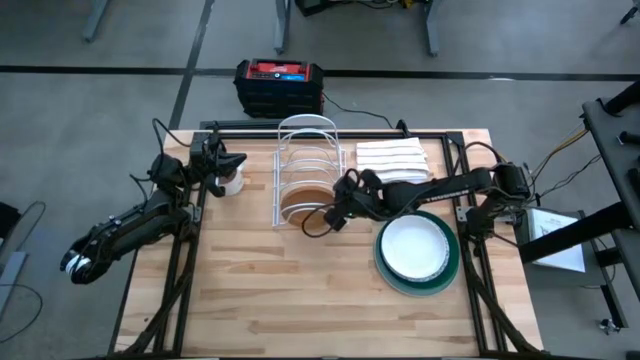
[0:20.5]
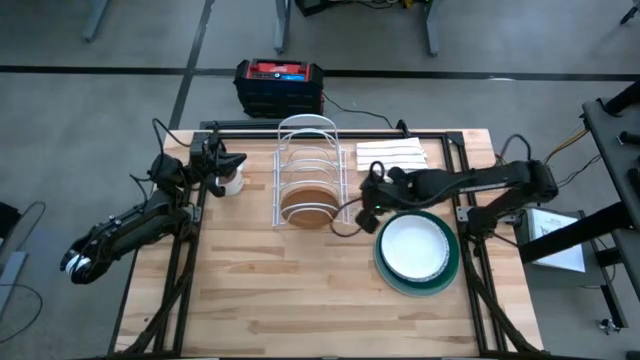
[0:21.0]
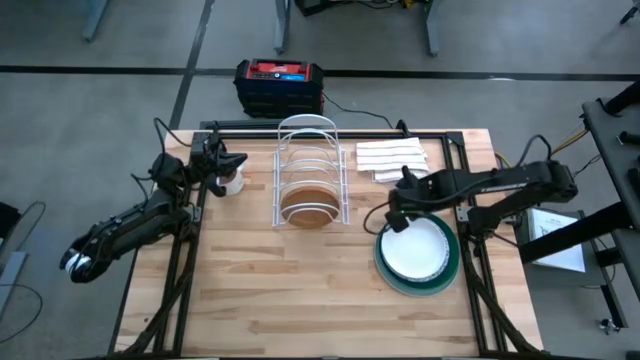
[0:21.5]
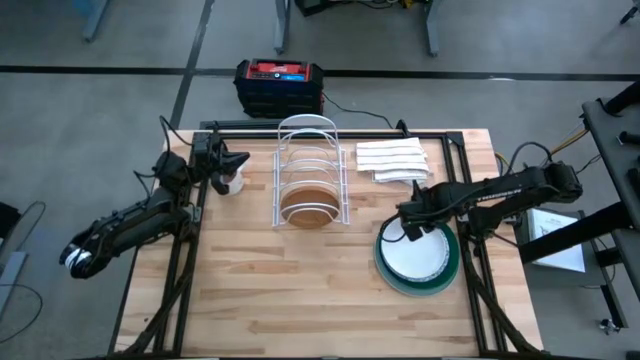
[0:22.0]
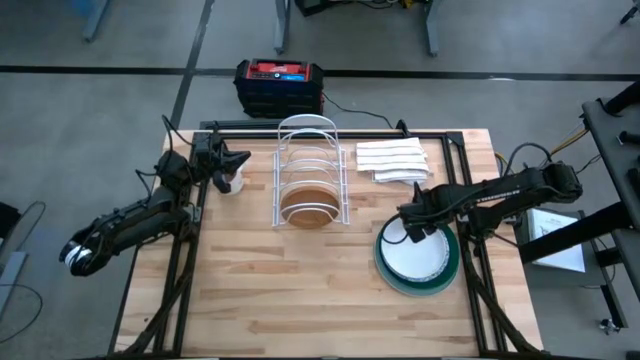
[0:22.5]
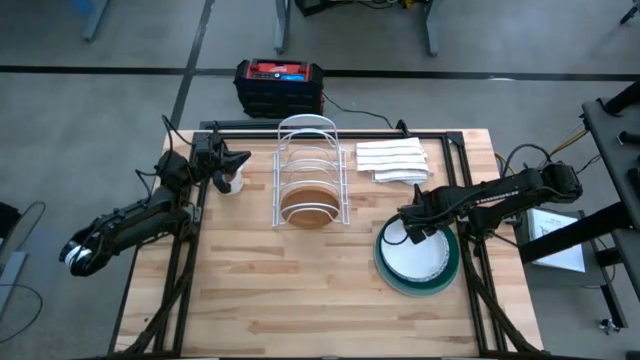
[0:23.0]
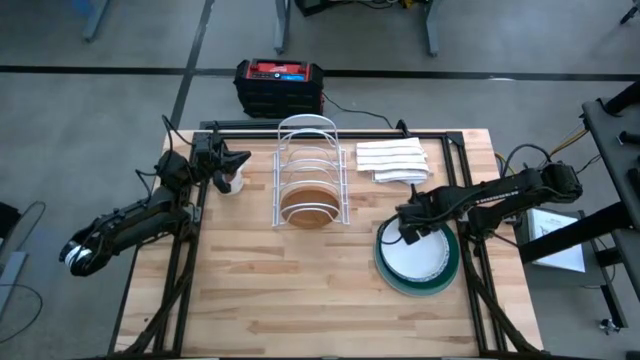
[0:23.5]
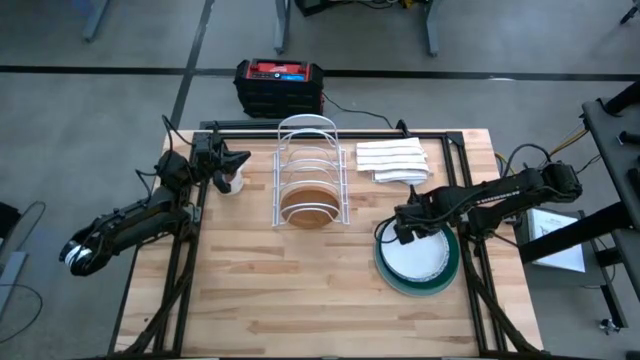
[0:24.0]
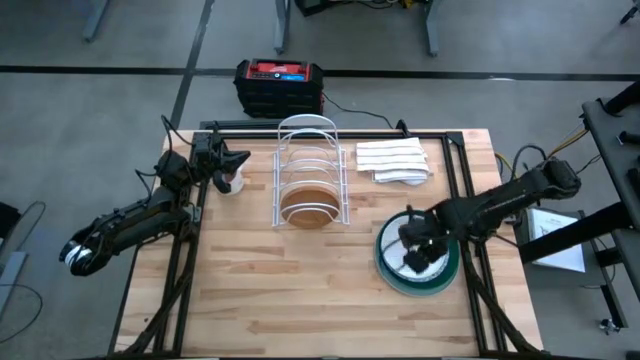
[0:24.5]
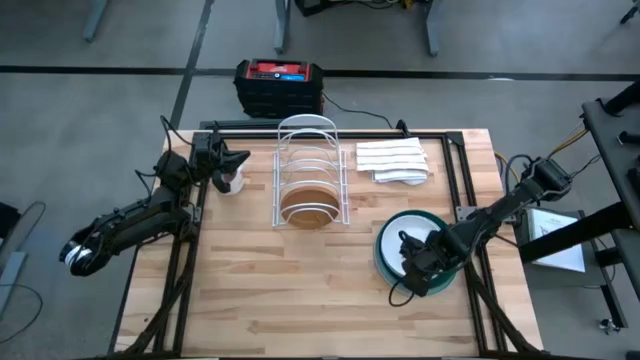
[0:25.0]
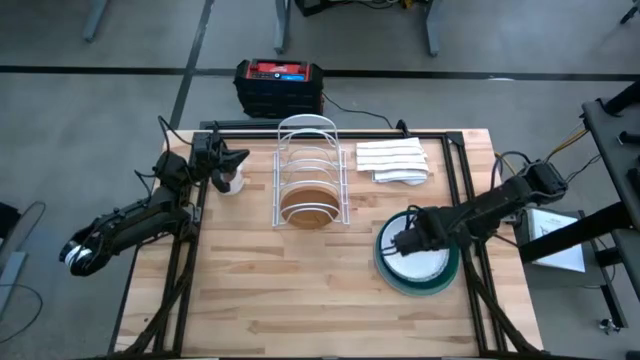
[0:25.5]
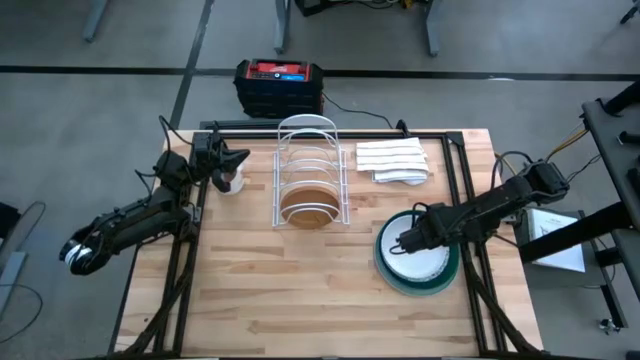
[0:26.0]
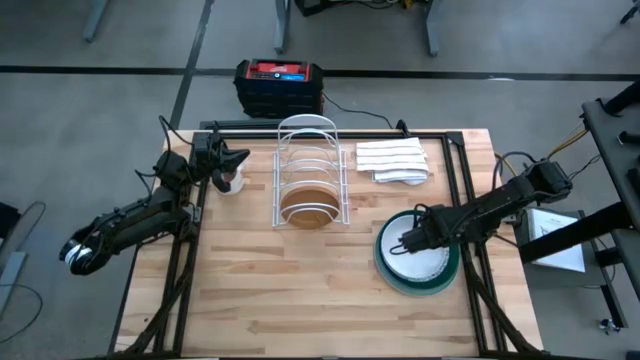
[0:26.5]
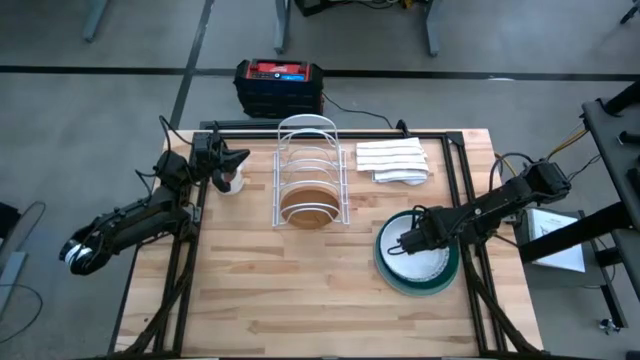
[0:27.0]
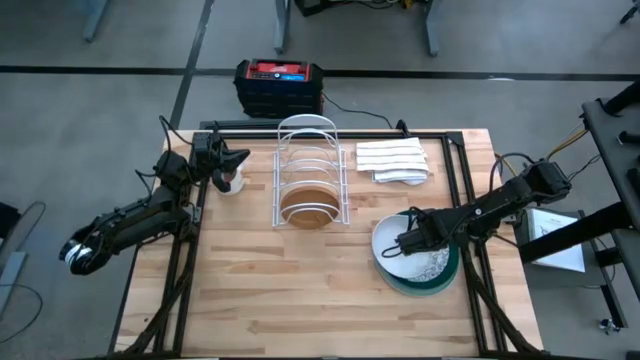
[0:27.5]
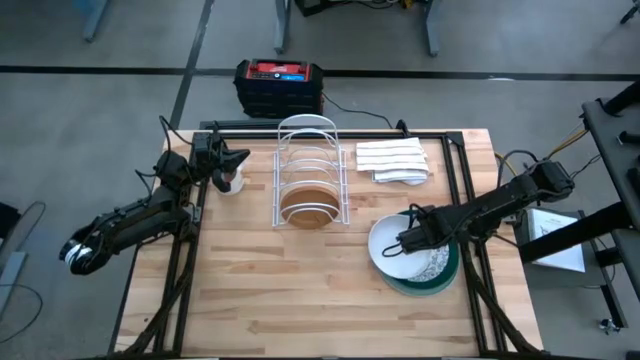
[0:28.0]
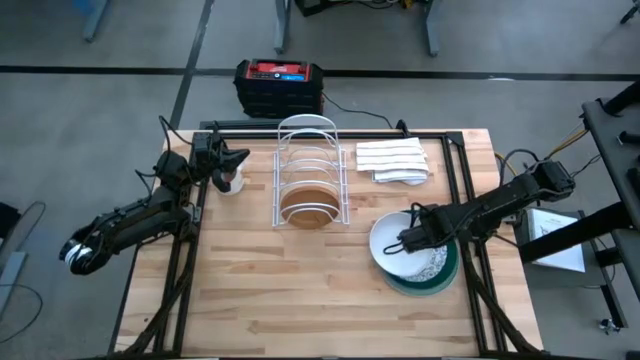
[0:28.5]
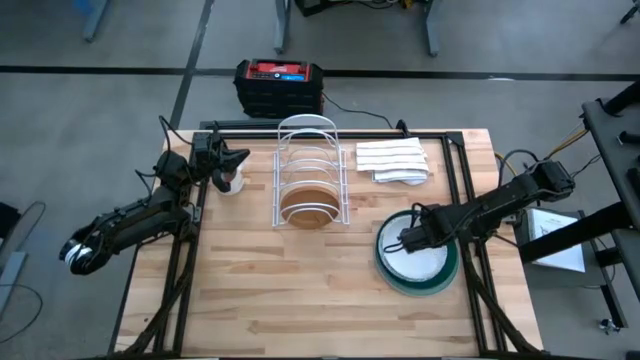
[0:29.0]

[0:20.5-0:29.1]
Task: Sort dishes
Put the white plate in the dish rack

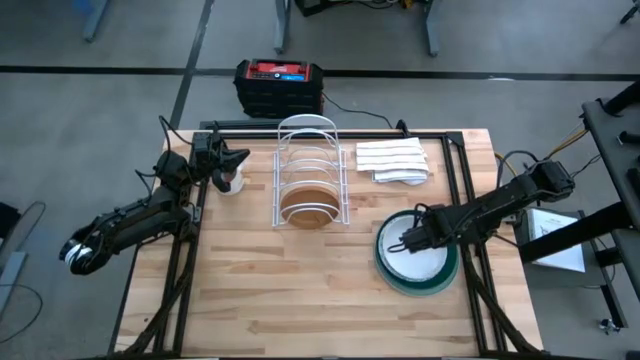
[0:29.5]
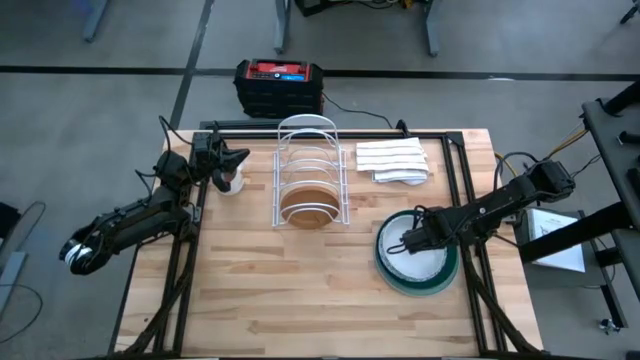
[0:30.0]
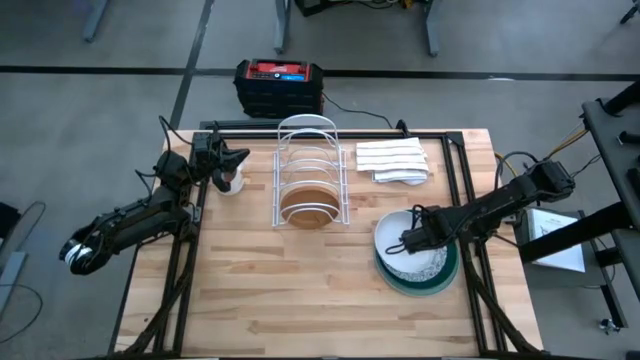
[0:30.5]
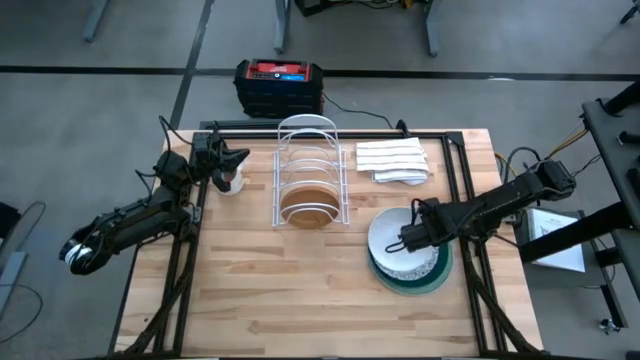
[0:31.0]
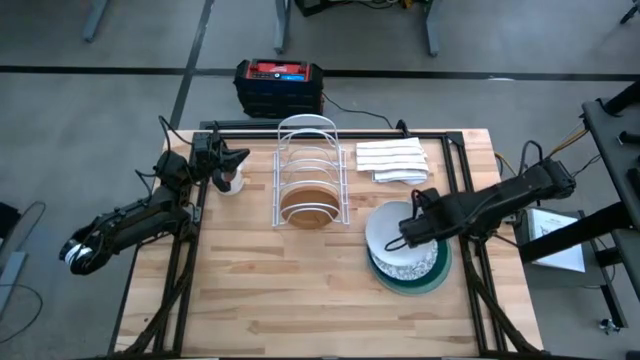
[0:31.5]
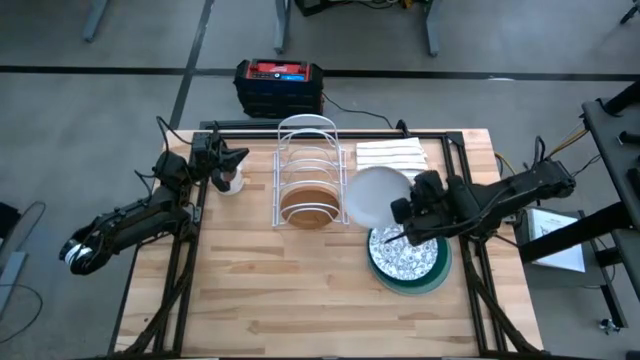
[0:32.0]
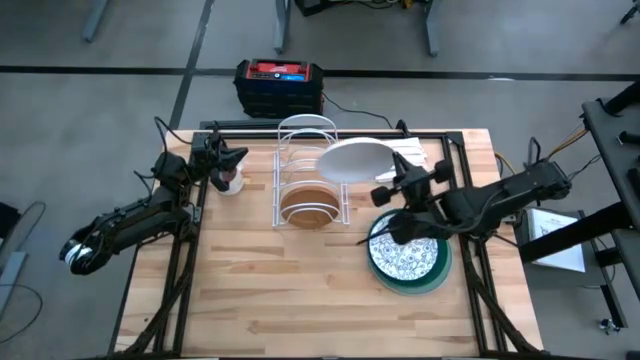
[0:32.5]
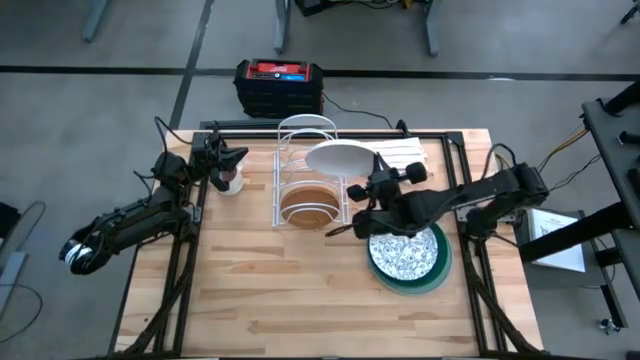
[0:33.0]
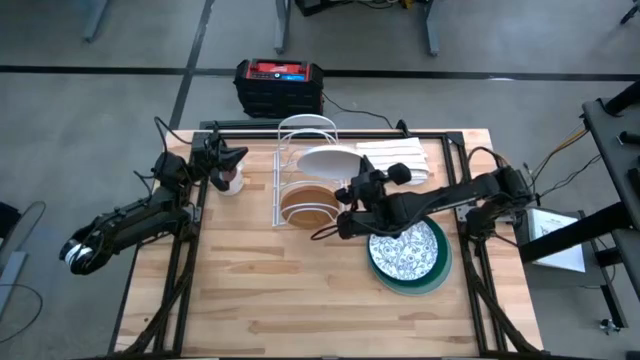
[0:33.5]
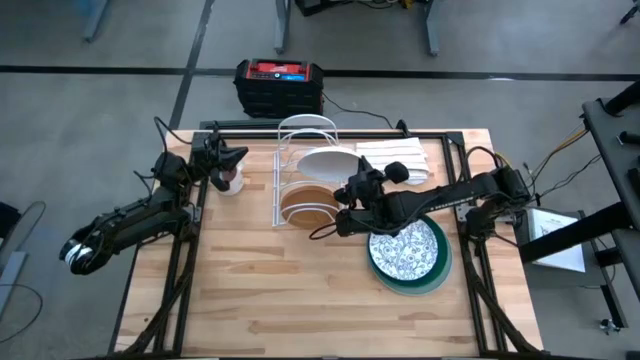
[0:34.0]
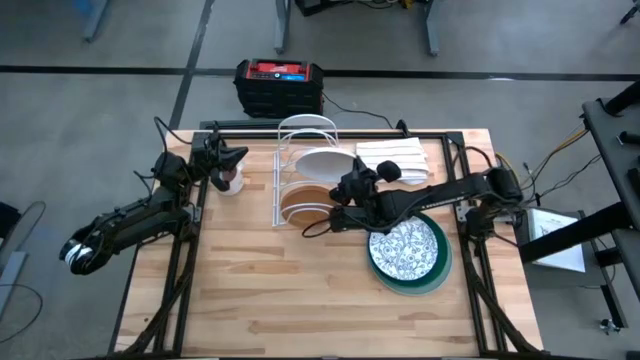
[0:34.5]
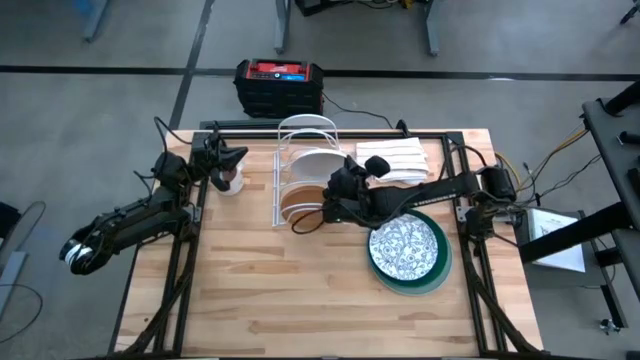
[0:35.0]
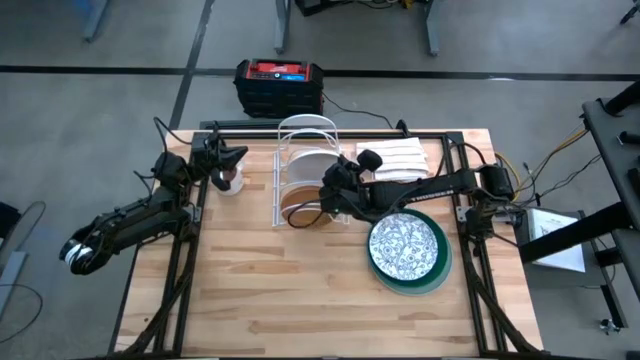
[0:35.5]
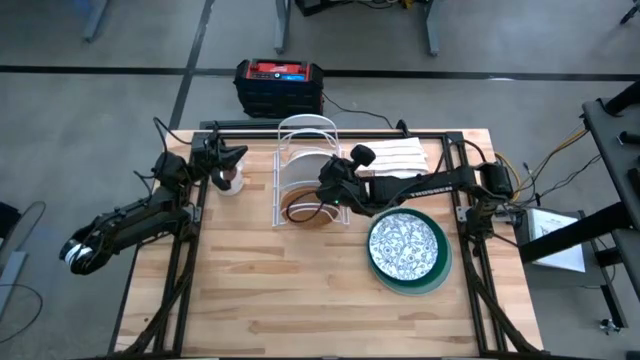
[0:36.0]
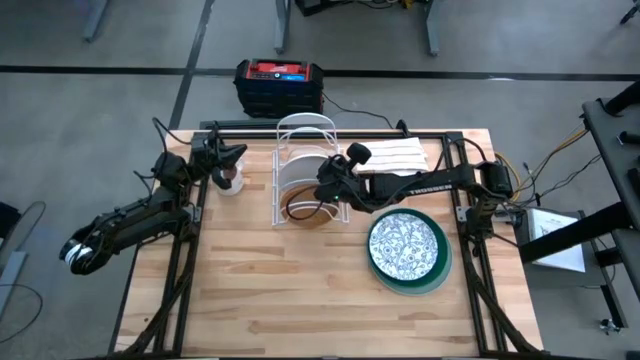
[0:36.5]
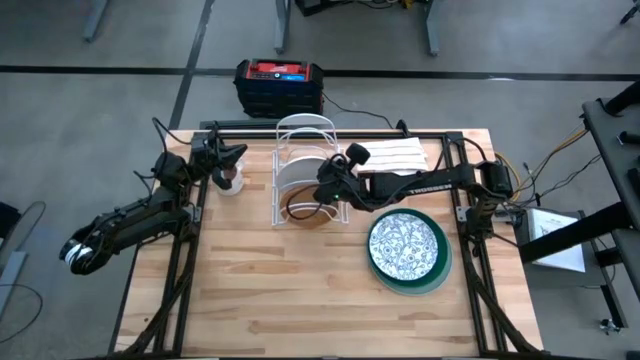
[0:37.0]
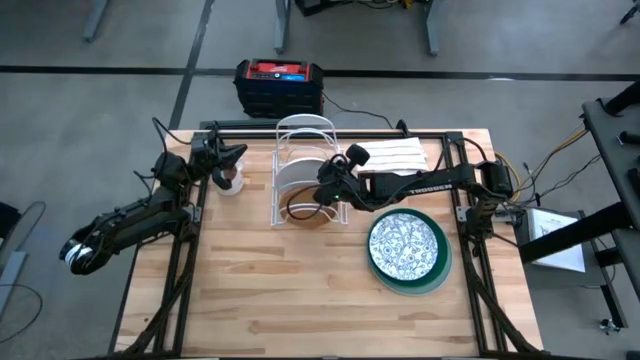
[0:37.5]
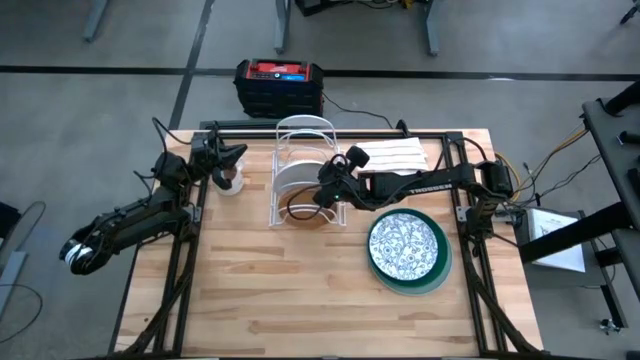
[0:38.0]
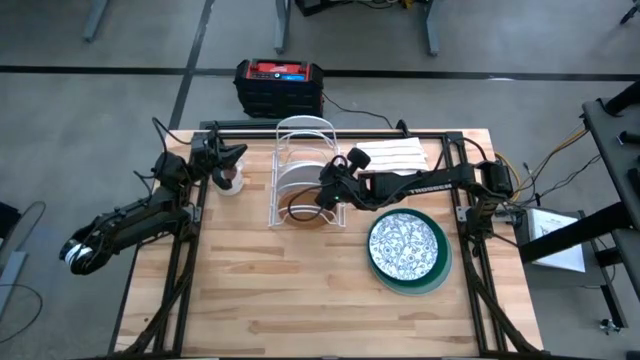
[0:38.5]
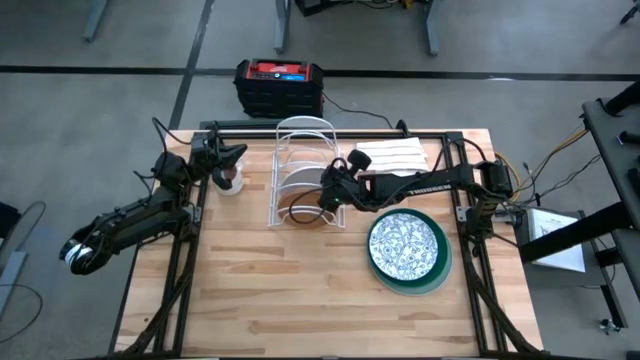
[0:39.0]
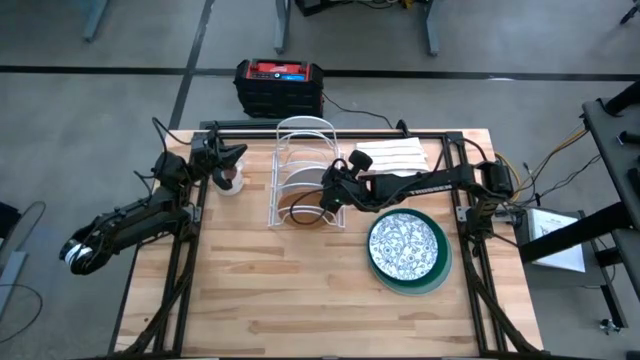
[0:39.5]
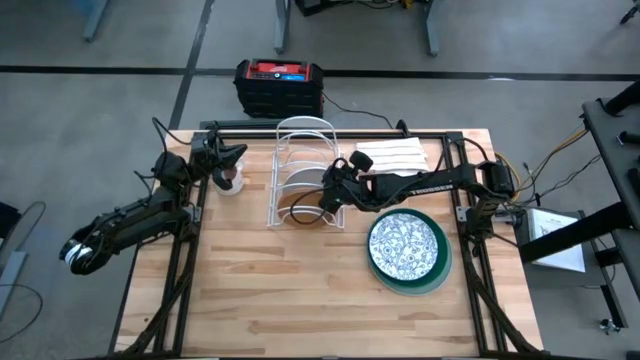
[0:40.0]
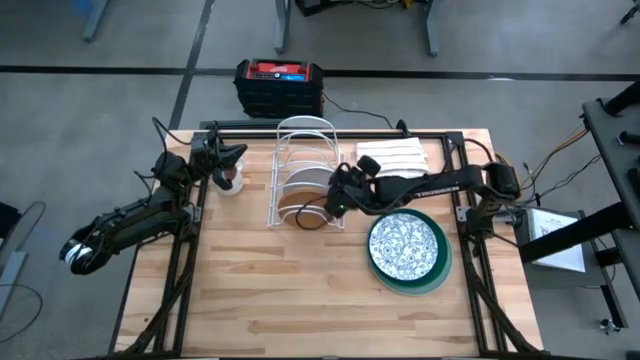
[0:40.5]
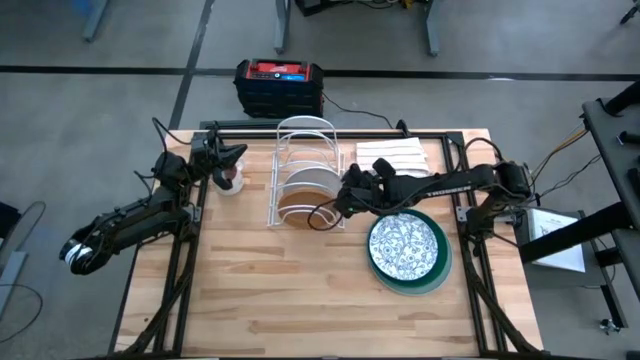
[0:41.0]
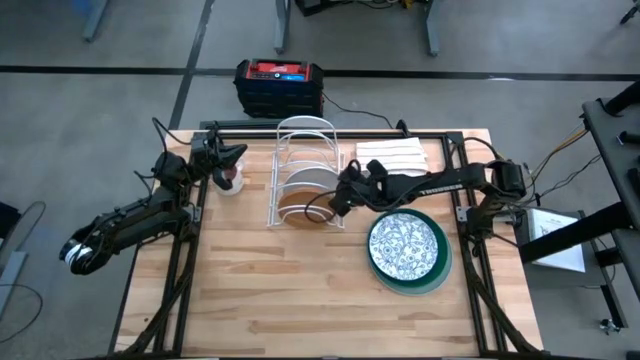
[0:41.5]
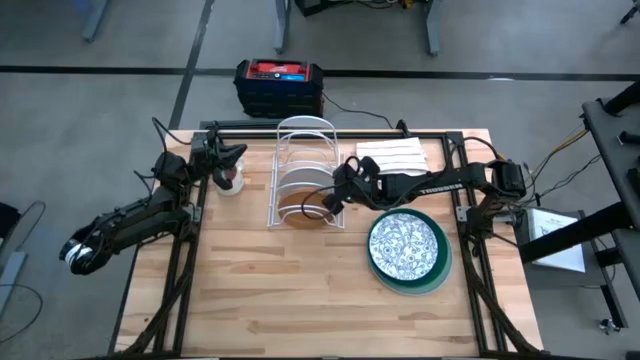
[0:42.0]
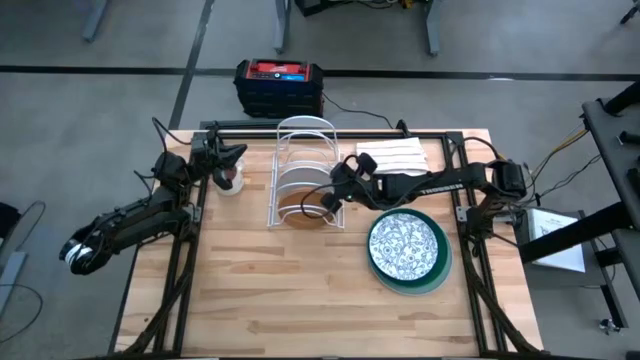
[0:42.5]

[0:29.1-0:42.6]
Put the white plate in the dish rack
